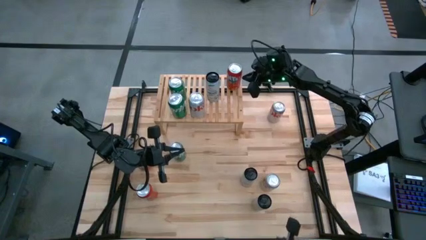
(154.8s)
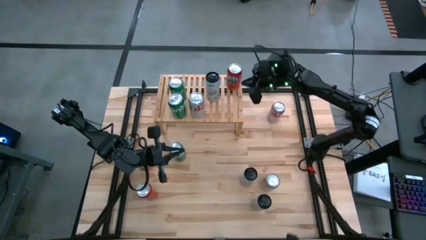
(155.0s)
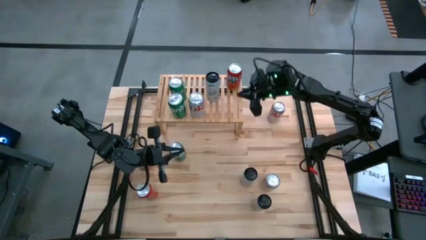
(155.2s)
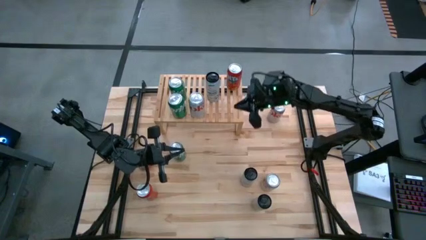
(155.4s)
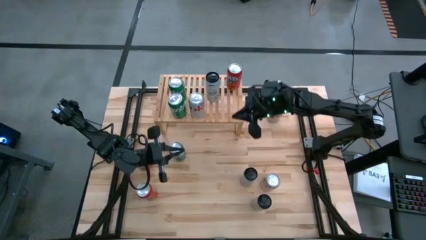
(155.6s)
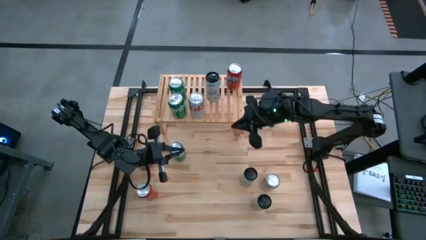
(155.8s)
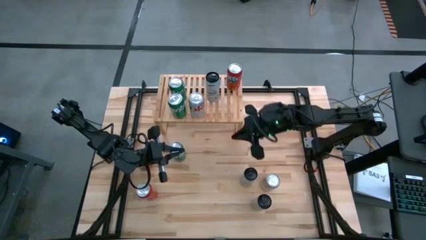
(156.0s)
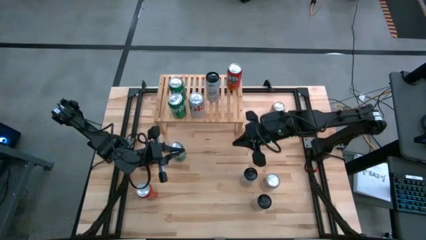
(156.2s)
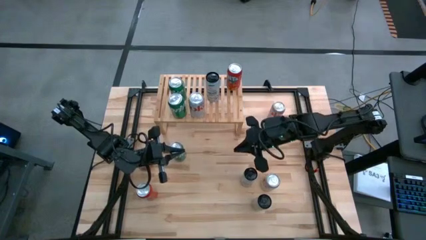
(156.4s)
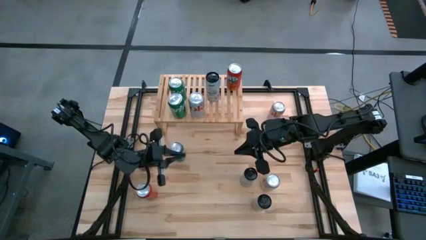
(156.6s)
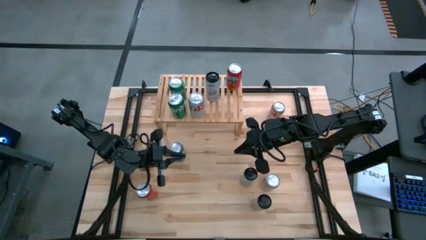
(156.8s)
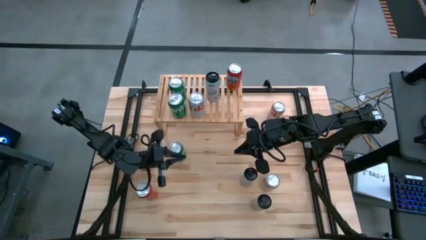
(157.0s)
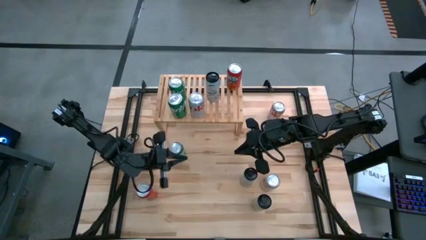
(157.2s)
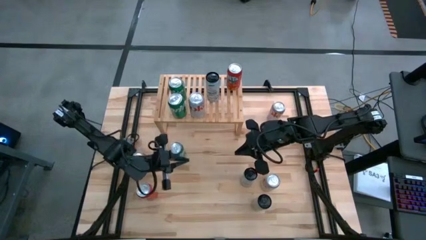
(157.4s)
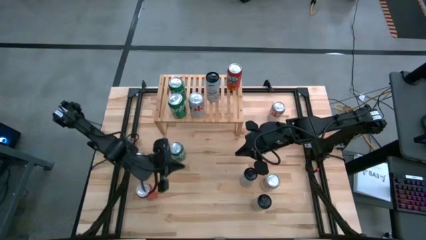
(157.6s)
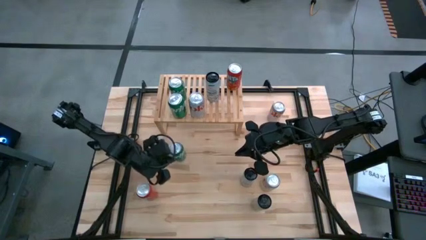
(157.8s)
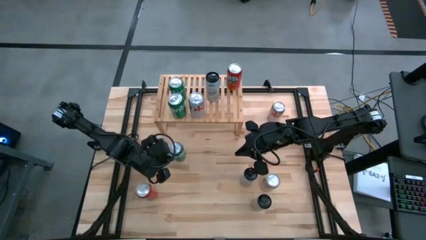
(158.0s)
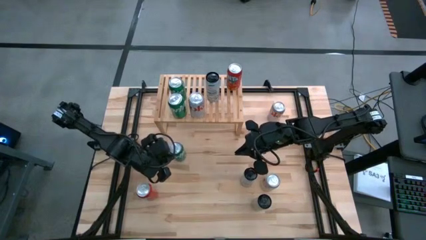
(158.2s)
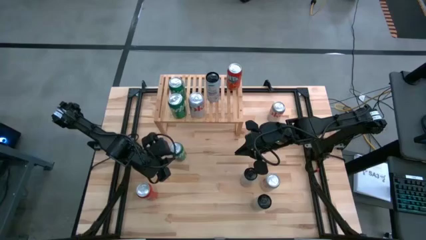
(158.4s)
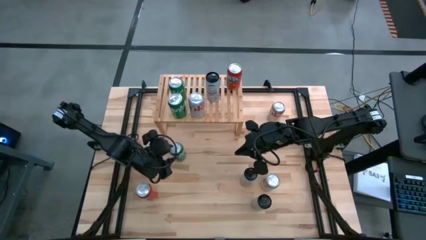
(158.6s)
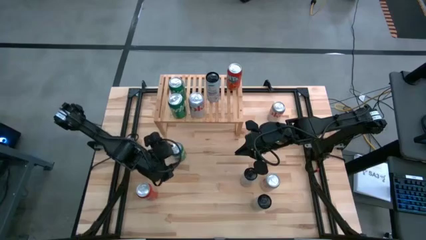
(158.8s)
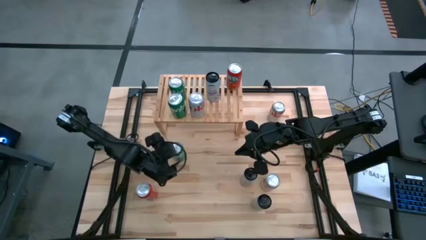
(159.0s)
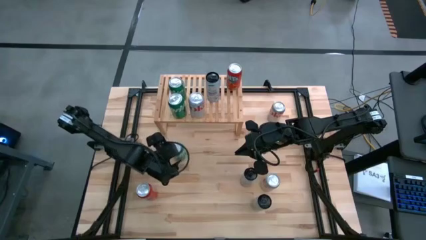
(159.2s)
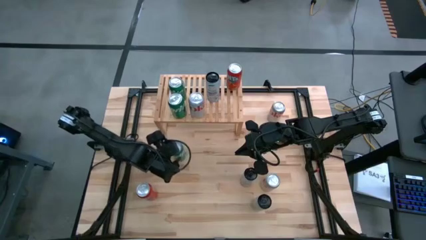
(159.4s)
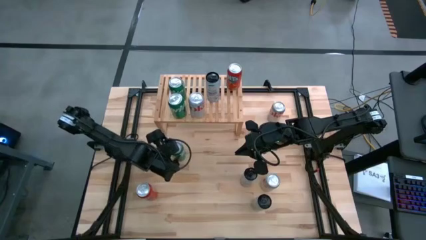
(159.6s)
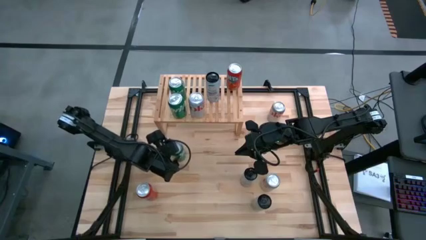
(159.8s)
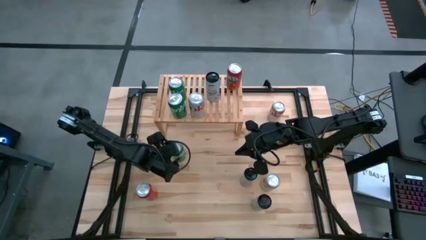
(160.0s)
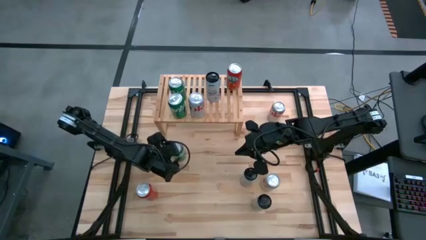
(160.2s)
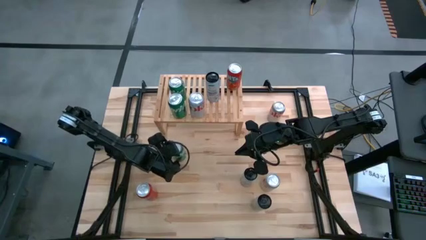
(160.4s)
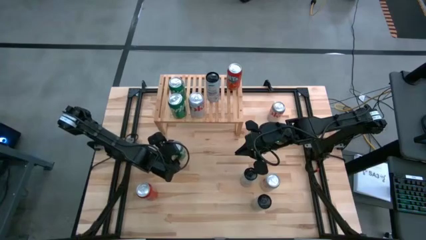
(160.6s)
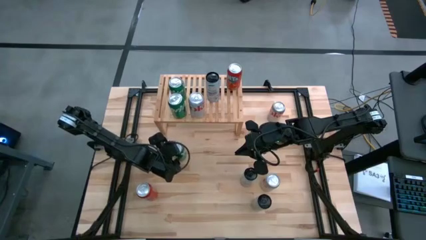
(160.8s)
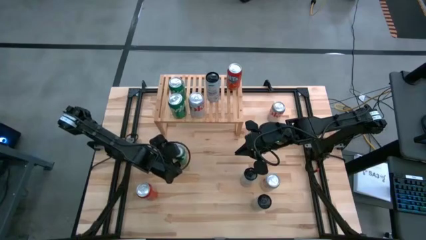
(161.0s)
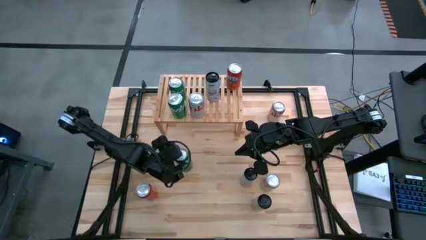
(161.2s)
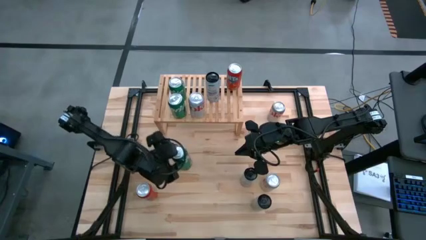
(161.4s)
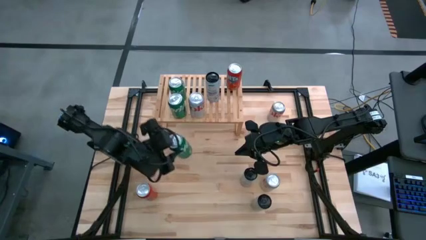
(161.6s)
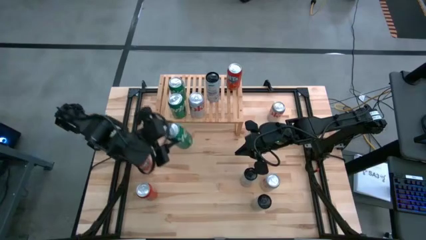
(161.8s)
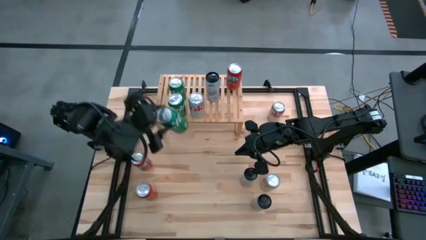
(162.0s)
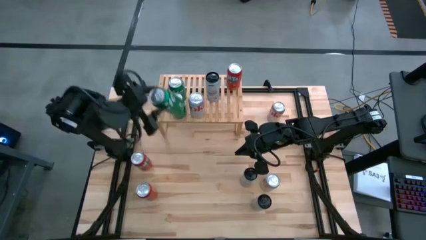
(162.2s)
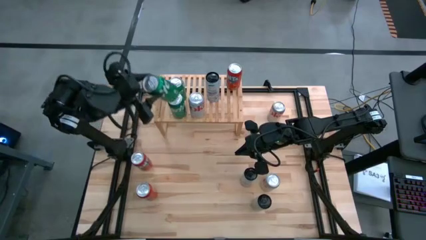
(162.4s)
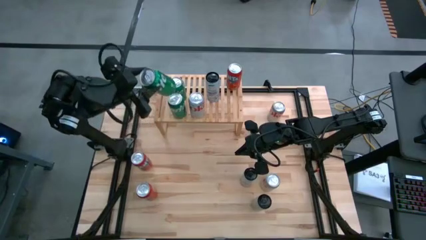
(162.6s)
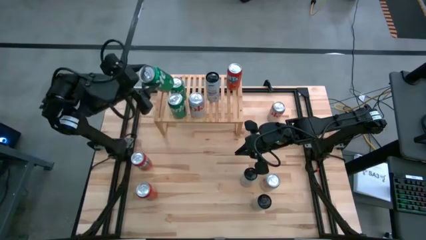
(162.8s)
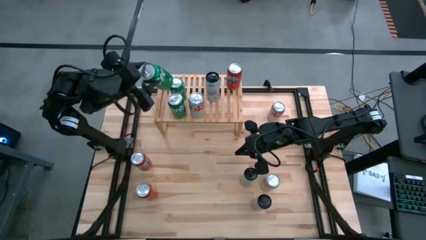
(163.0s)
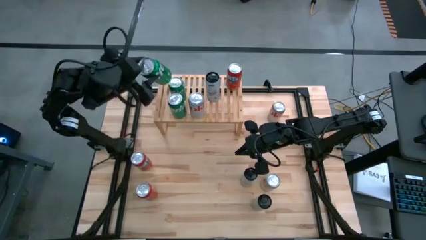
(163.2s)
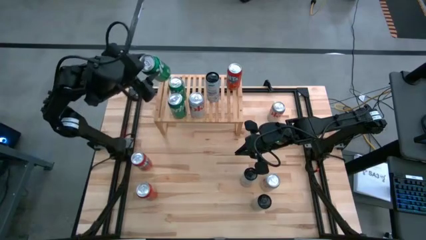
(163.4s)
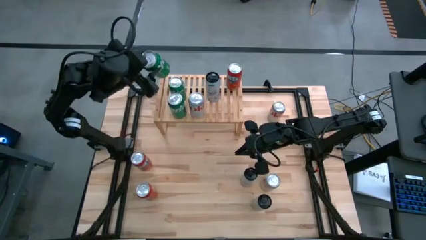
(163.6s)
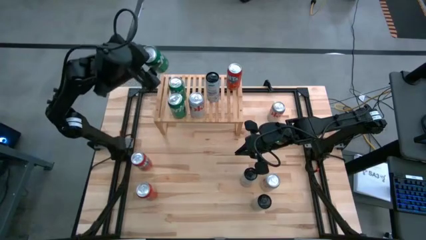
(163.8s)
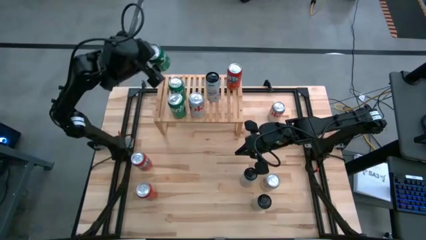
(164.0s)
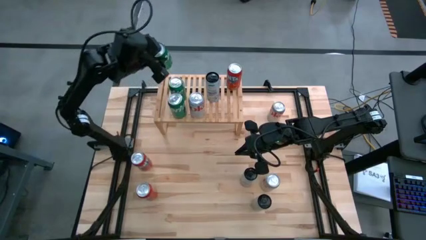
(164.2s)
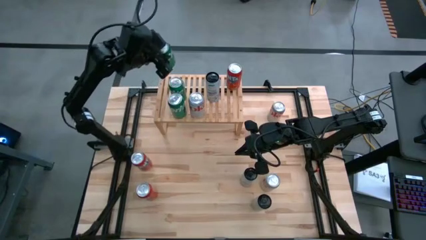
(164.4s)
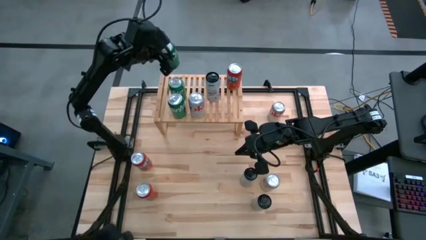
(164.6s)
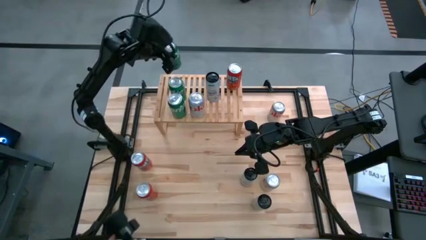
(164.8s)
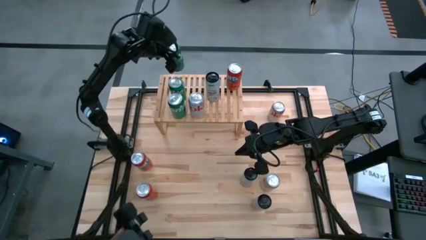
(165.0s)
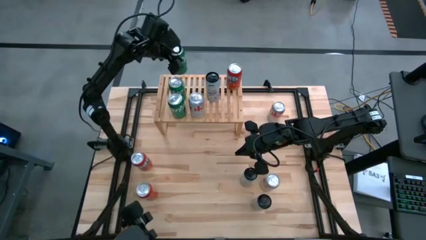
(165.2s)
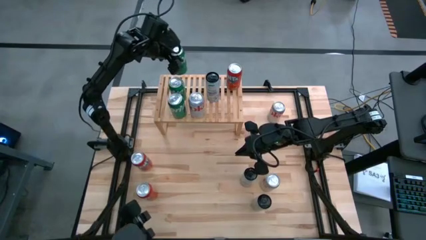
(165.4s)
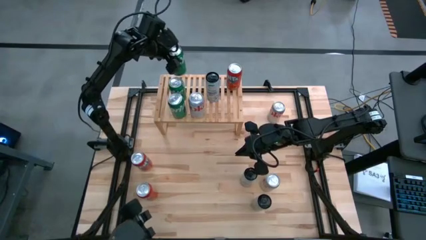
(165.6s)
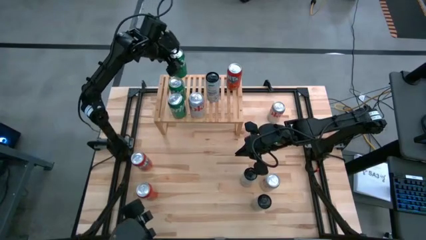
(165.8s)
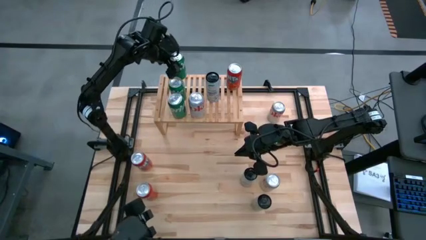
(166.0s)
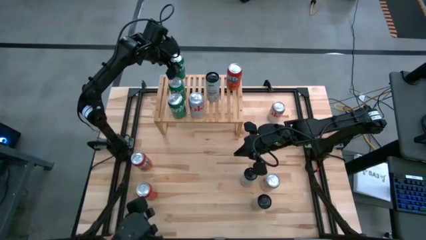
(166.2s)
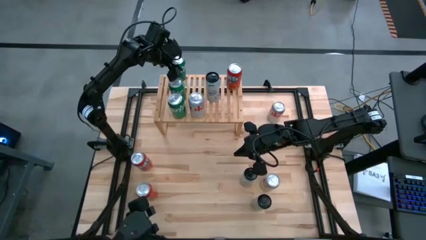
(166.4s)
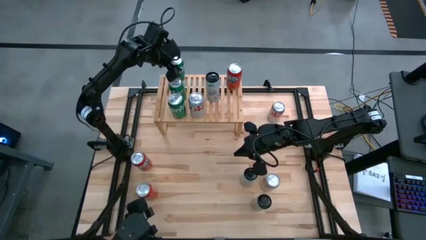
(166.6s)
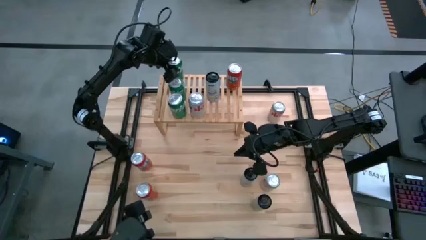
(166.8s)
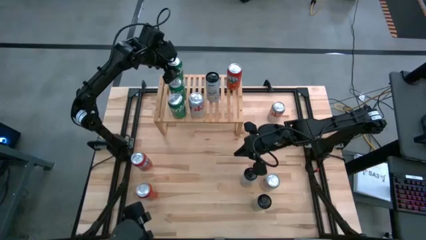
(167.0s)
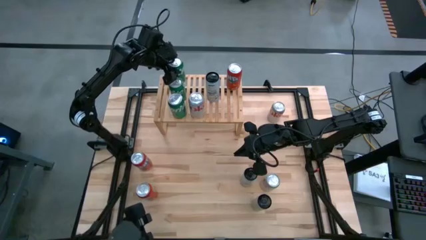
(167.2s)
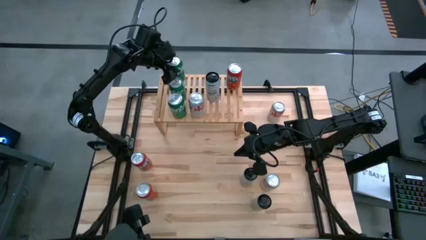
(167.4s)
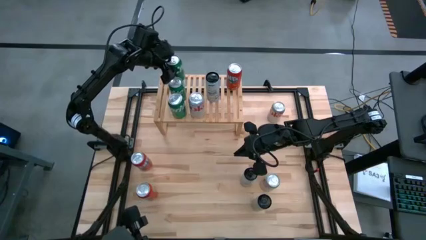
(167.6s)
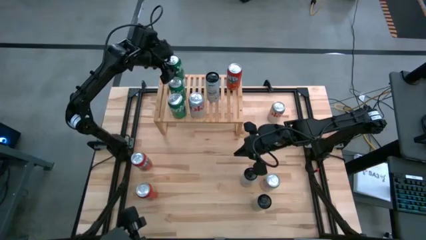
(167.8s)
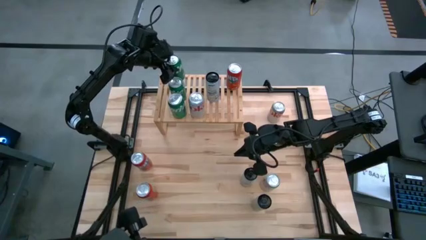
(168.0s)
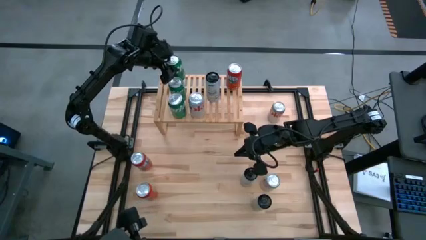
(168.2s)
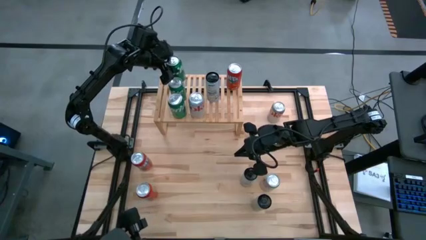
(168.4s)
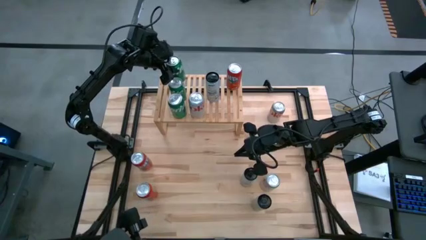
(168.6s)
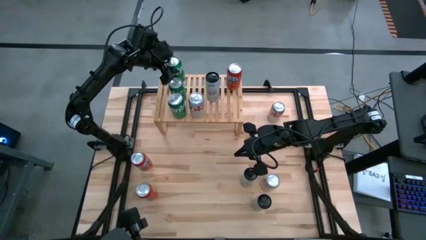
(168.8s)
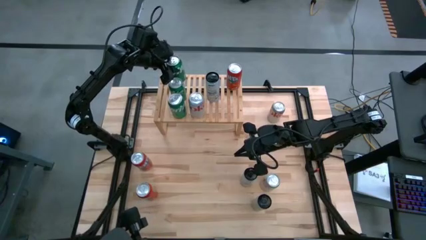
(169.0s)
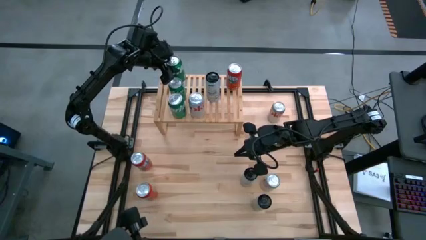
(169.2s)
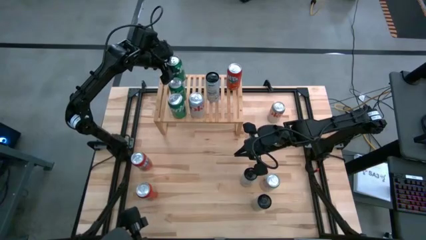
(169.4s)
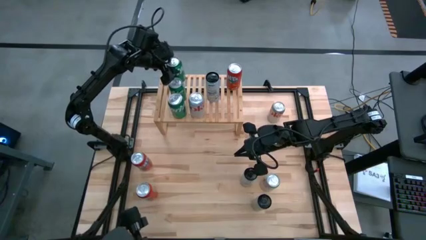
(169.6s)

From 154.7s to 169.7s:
Task: Place canned beverage on shelf
Put the green soda can on the shelf

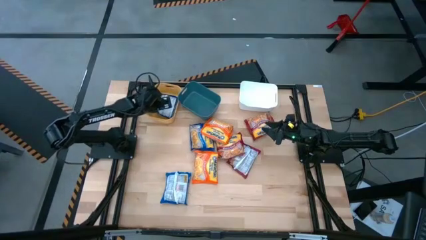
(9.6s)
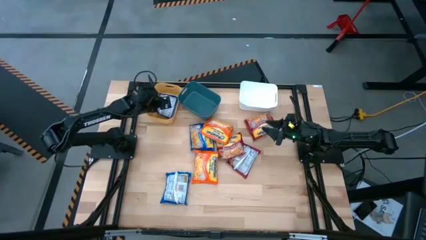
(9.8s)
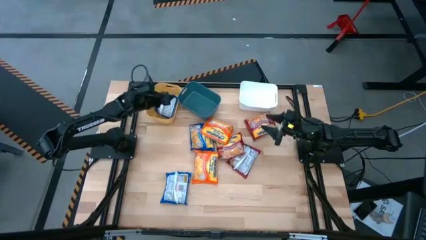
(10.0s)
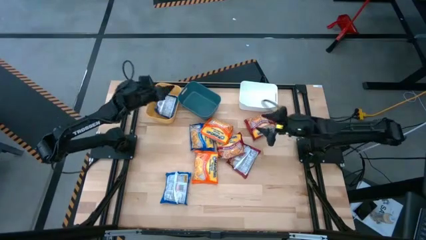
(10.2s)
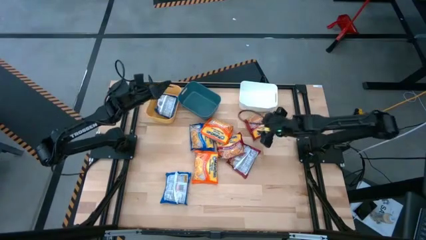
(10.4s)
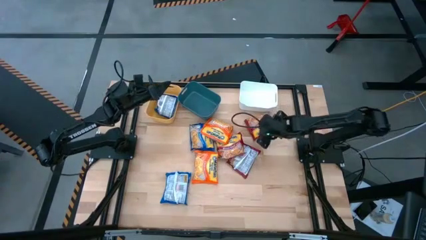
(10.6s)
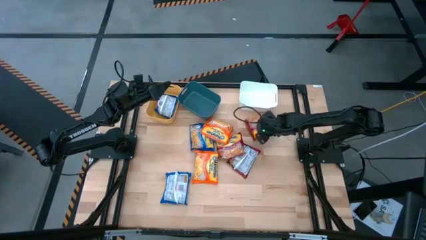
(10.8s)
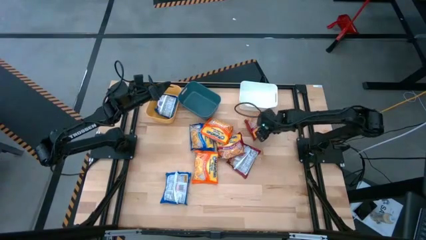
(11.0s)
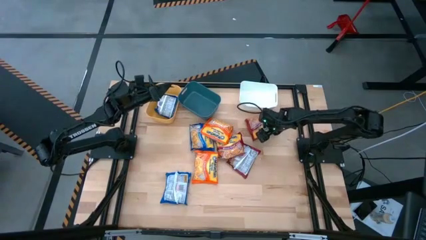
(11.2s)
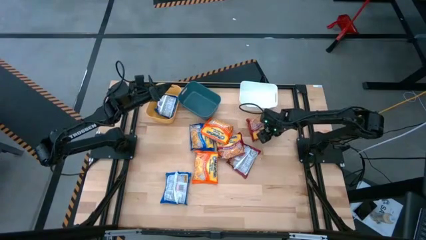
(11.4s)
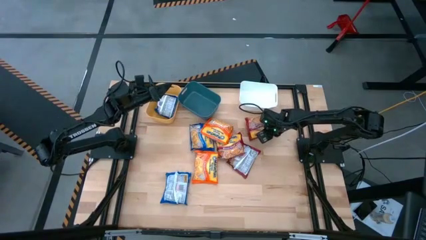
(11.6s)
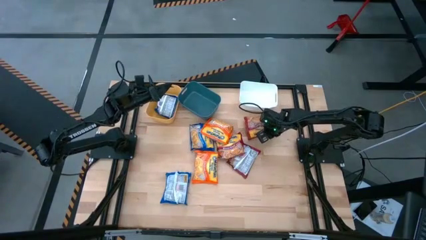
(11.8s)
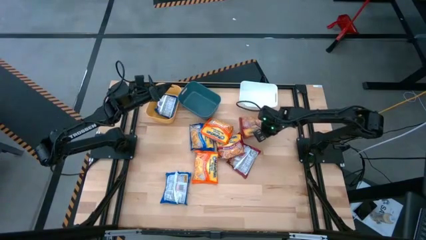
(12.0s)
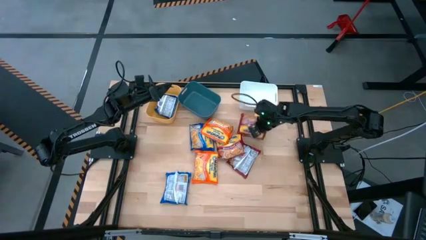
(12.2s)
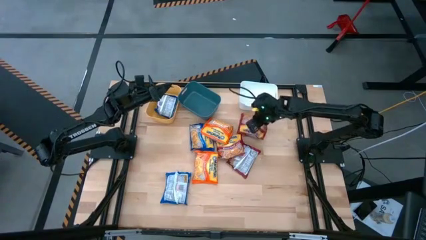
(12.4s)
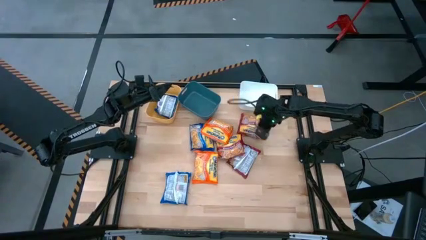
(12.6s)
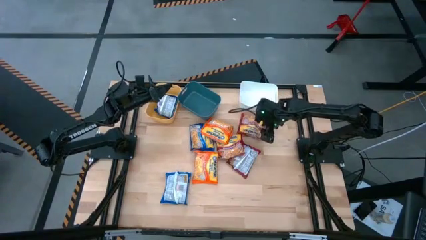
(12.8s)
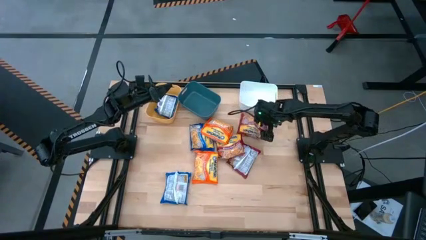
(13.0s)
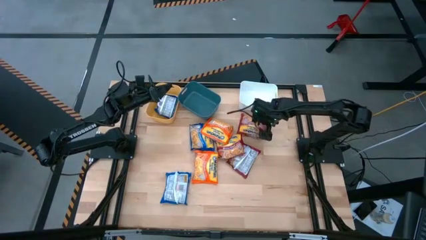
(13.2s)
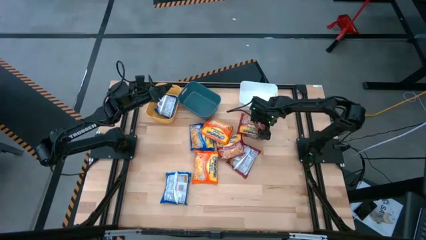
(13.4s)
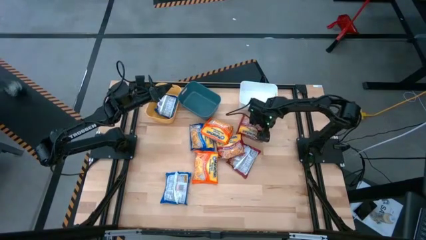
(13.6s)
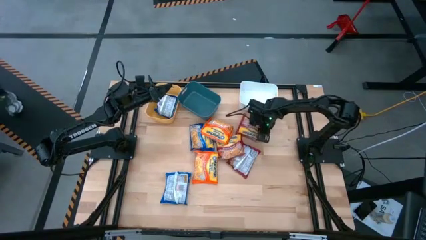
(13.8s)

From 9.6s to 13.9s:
Task: Sort Maruchan noodles
Put the top right red bag into the blue bin
